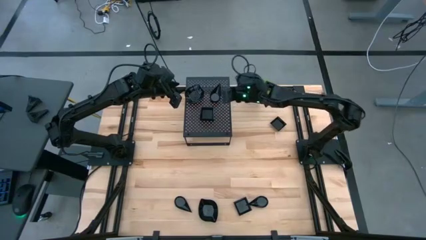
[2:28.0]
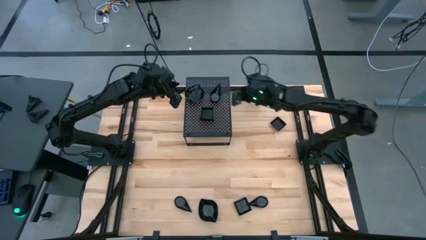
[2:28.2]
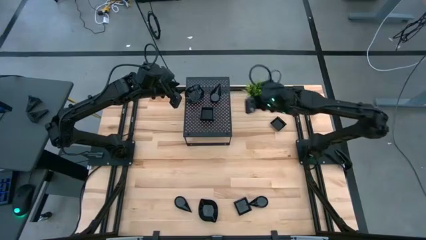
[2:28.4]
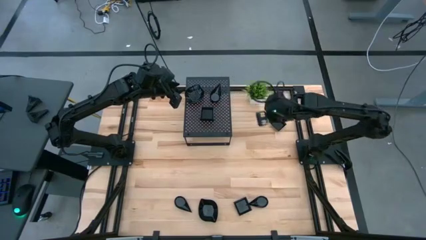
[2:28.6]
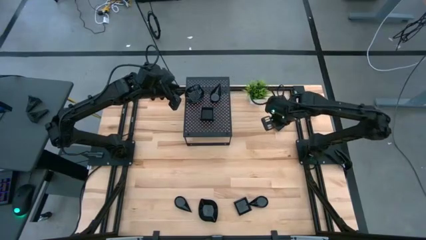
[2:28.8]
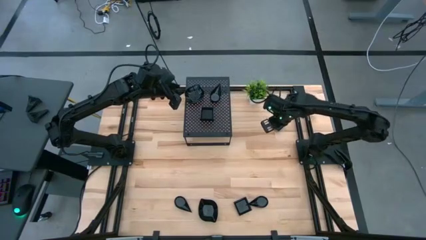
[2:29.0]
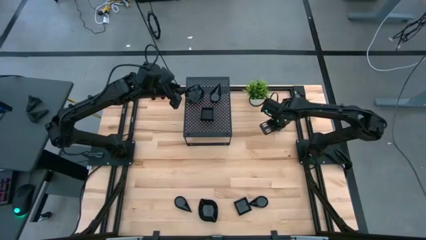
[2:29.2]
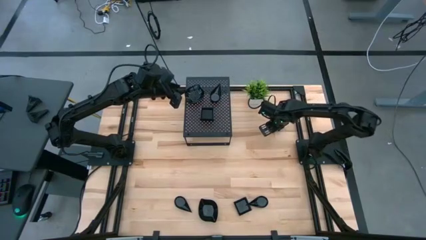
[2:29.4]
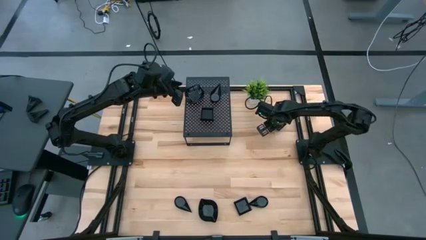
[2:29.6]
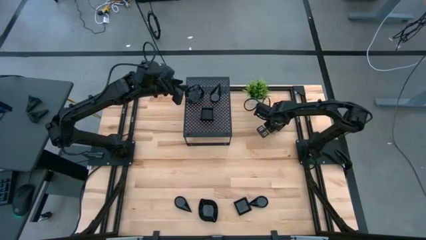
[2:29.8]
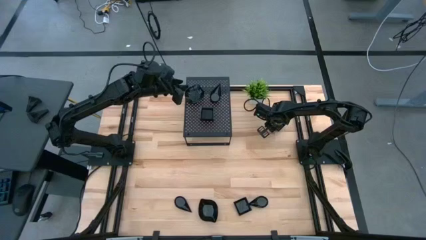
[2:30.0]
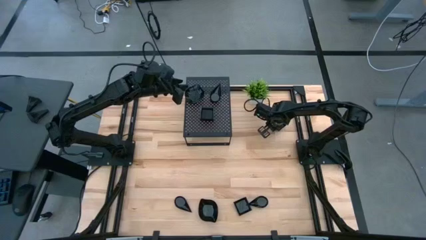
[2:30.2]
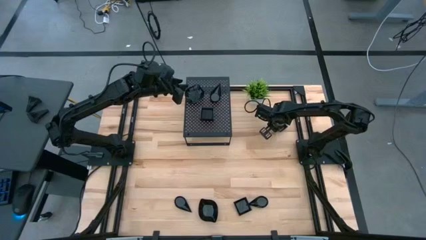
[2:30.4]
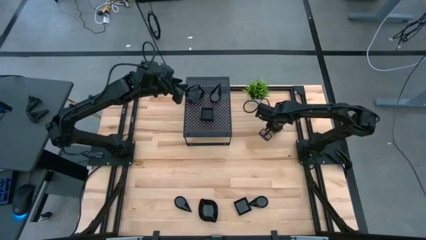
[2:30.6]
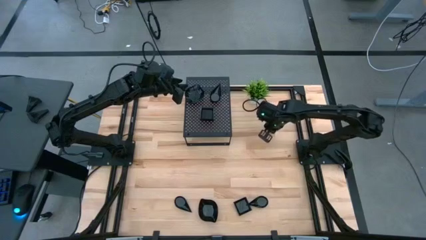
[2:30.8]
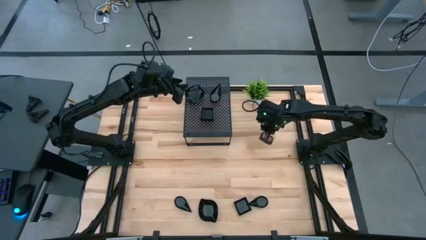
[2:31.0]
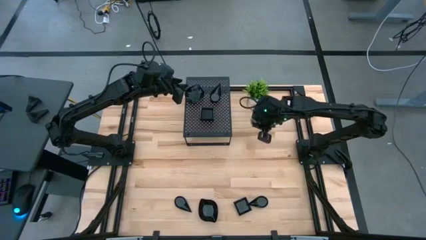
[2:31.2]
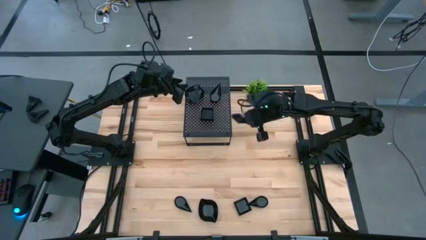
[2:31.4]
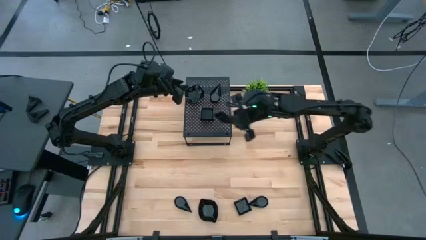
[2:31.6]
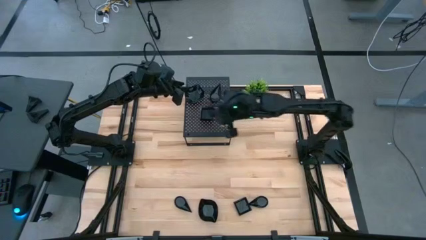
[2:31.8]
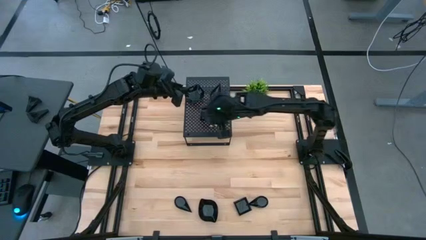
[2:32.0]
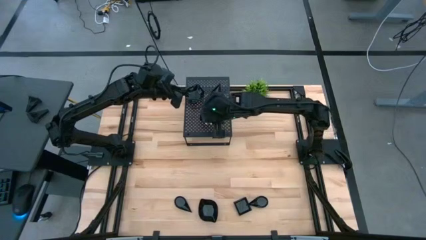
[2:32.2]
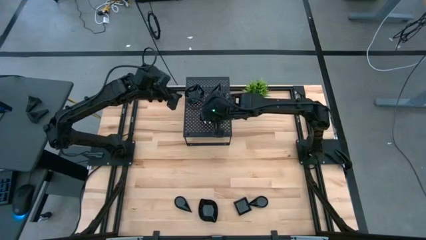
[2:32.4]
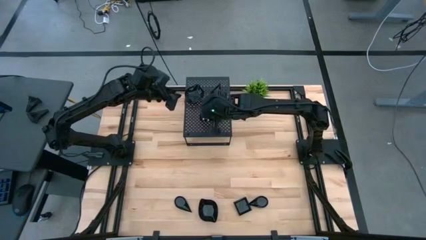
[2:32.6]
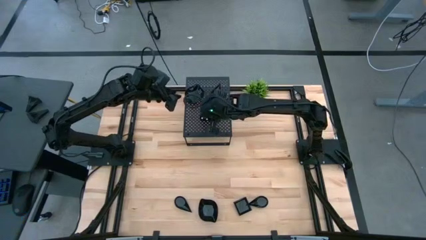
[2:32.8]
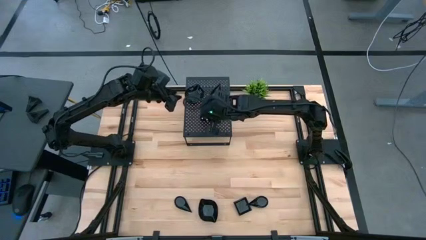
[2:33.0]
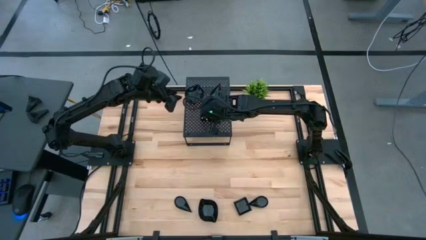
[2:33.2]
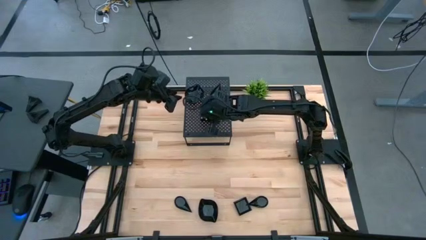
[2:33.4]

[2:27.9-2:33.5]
Task: Pick & Place Mini shaped plates
Stack the square plate on top of the square plates on the shelf

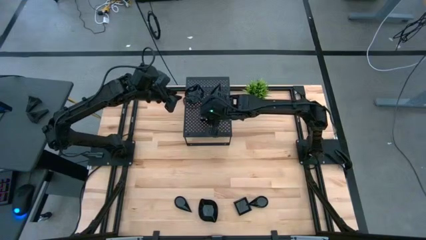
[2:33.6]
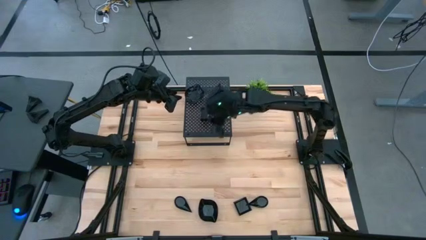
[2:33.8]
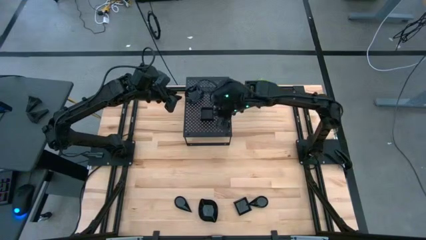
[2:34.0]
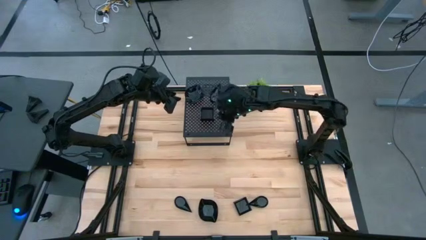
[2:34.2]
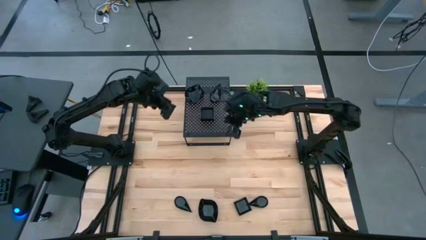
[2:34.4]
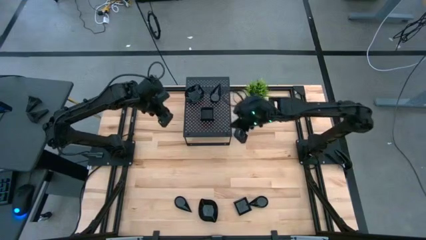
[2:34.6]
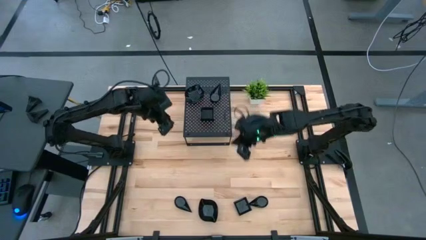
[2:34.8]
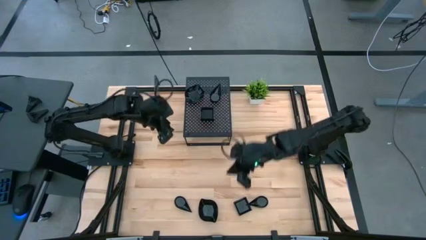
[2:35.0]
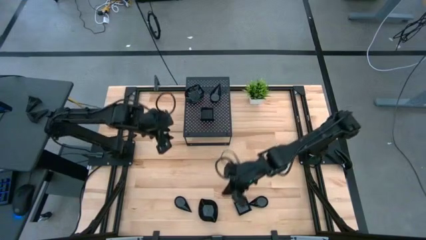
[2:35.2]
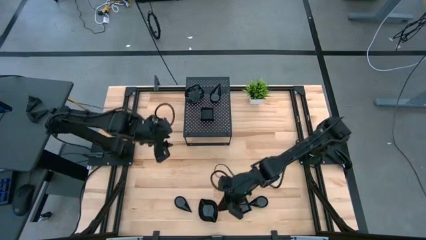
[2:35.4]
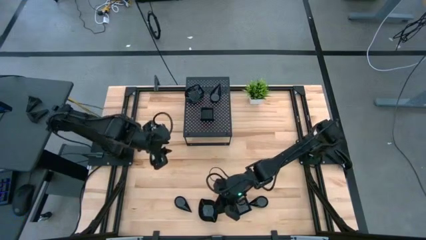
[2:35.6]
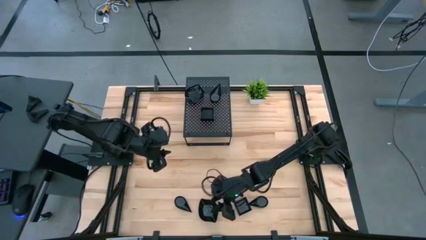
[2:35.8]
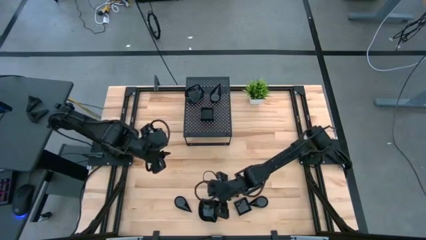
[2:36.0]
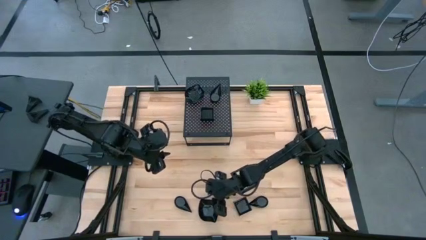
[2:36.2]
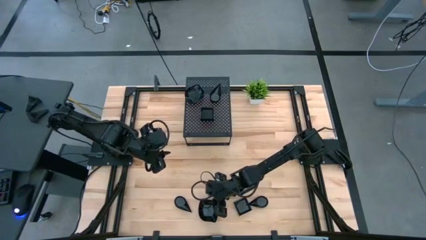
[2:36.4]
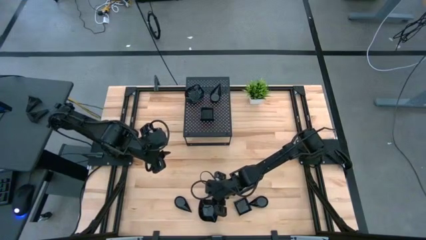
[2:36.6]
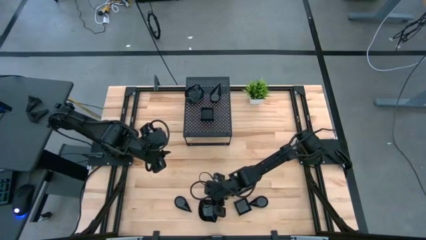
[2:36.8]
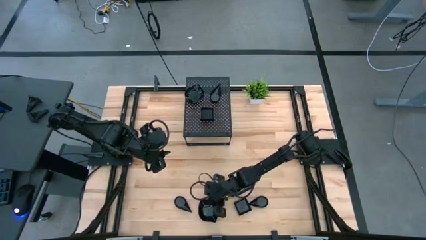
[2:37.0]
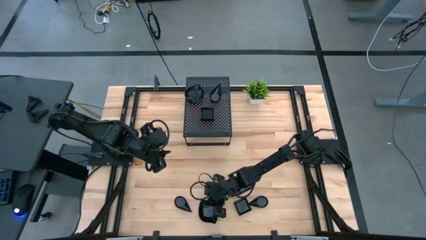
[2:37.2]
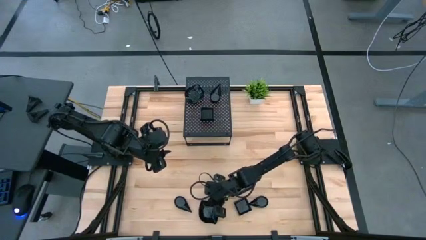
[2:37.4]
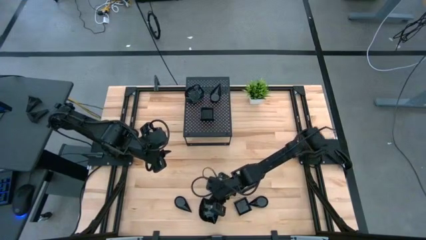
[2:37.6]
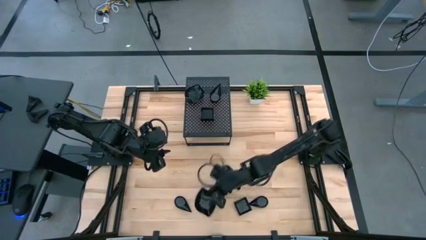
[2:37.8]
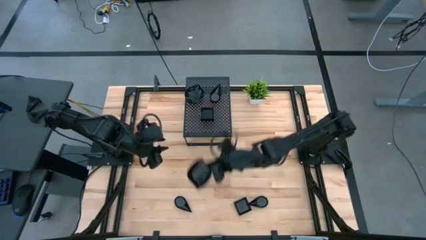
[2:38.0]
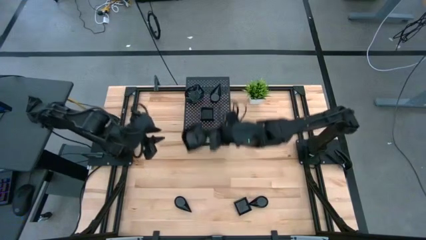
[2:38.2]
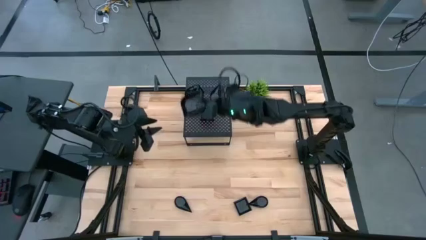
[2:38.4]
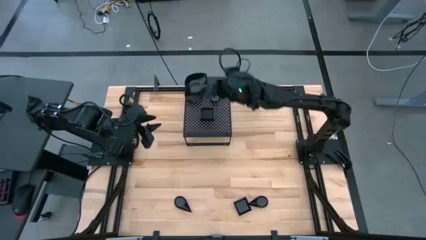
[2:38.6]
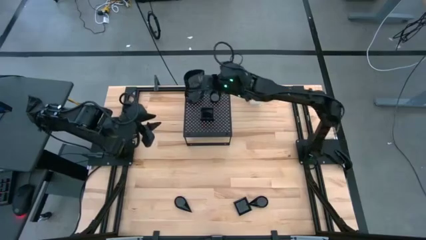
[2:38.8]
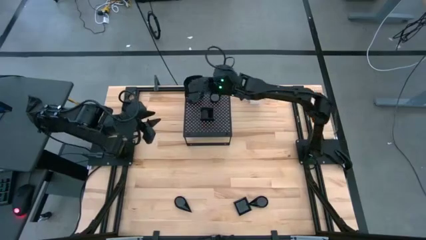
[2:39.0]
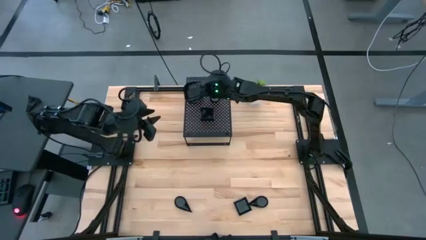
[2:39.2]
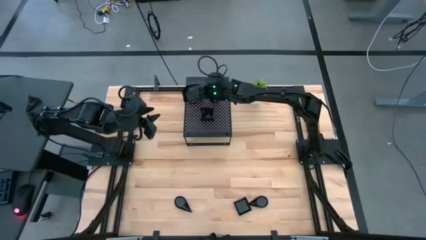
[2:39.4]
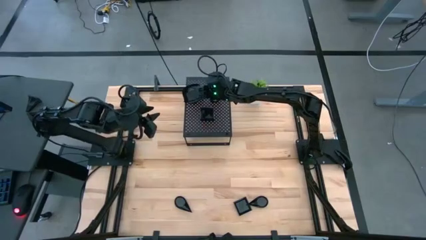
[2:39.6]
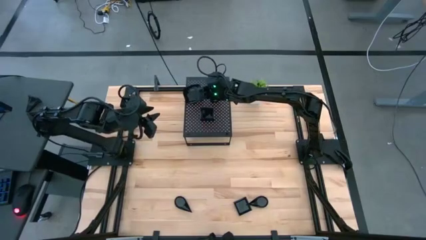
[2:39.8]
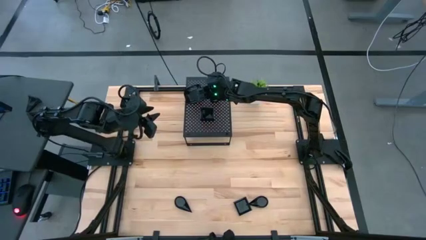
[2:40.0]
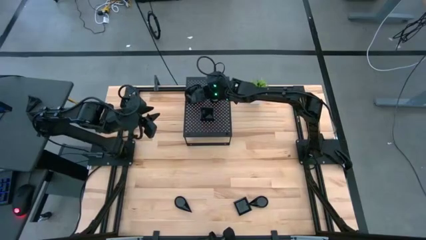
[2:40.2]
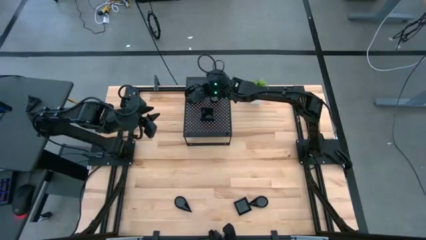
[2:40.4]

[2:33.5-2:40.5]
Stack the leaf shaped plate on top of the leaf shaped plate on the shelf

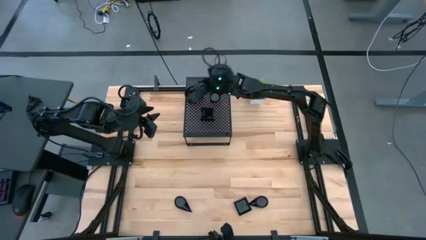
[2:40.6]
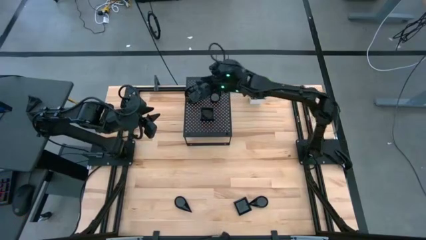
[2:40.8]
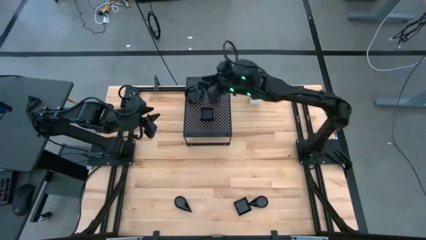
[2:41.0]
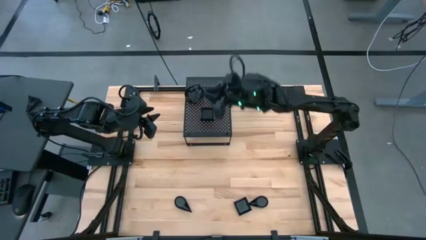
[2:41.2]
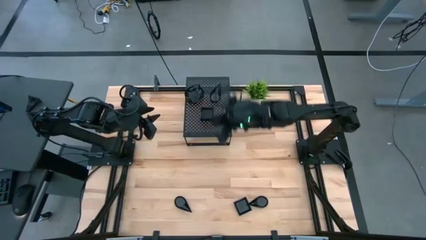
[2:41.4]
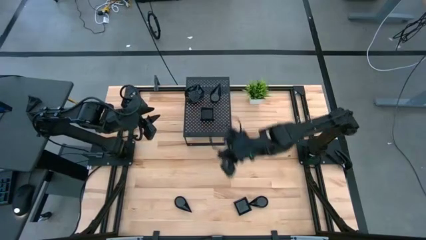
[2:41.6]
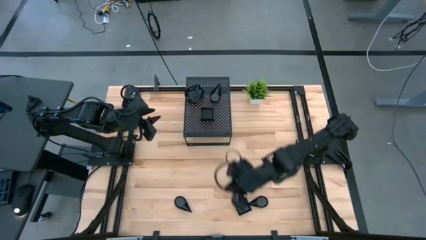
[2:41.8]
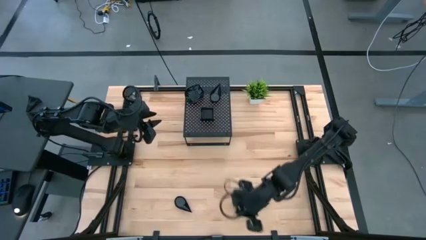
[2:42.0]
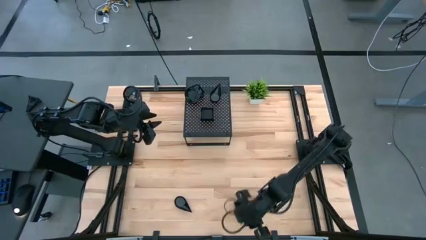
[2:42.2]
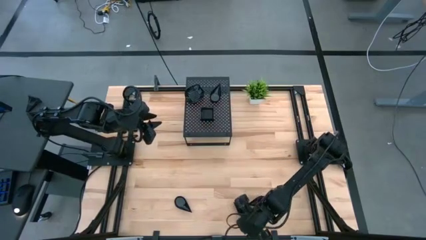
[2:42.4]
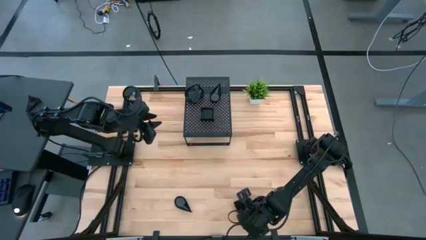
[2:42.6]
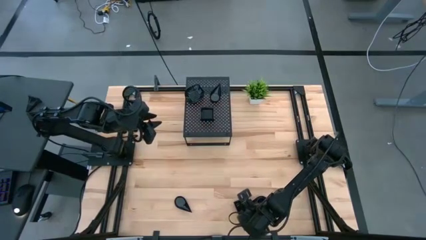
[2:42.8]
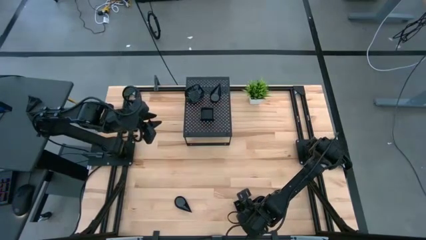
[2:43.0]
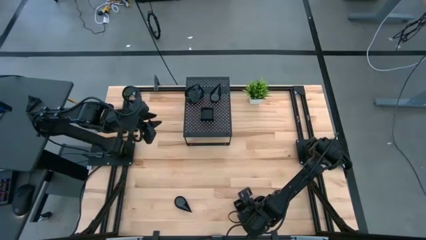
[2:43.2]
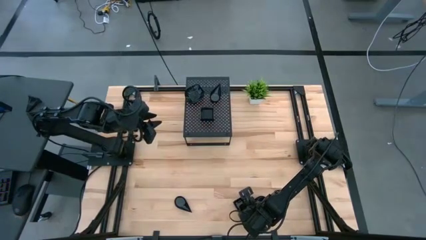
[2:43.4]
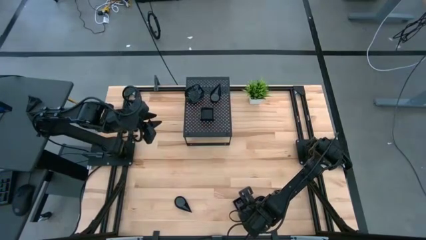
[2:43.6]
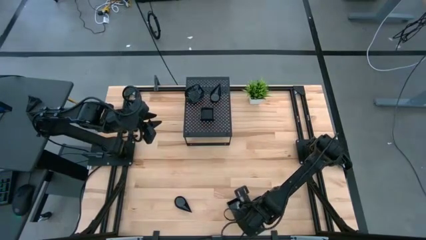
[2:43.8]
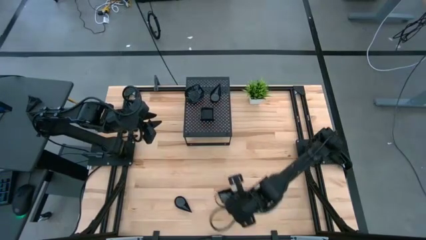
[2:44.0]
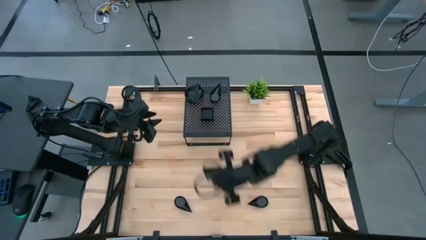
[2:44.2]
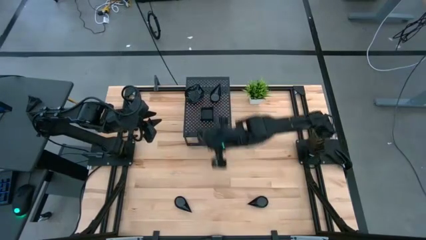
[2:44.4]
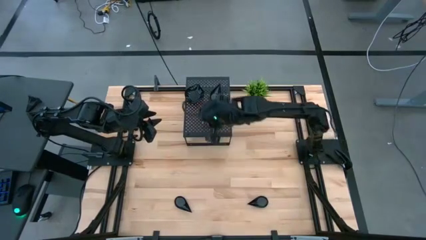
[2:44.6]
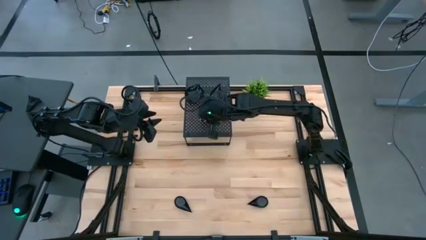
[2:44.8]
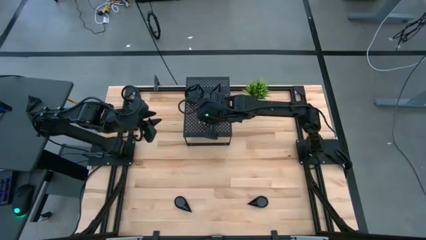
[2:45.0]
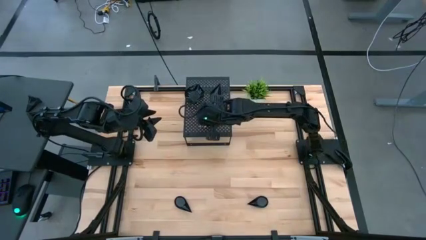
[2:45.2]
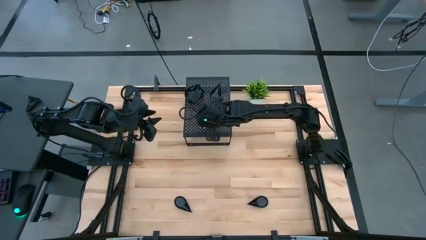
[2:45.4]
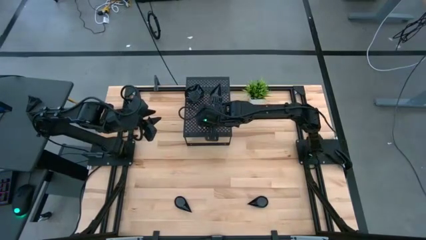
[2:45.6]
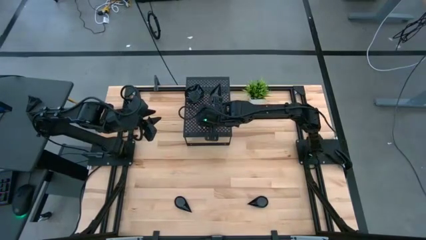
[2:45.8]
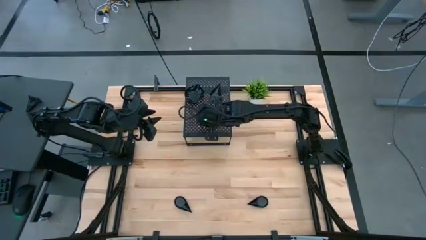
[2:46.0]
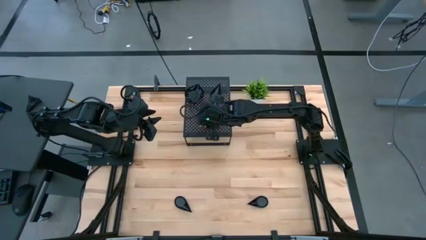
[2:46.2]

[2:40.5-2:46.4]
Stack the square plate on top of the square plates on the shelf
